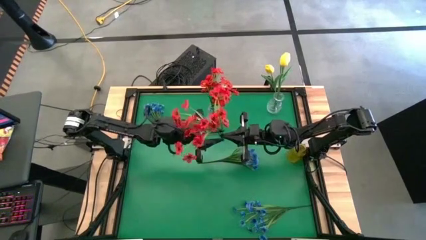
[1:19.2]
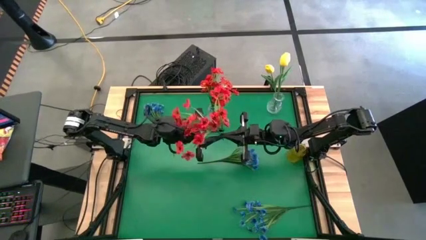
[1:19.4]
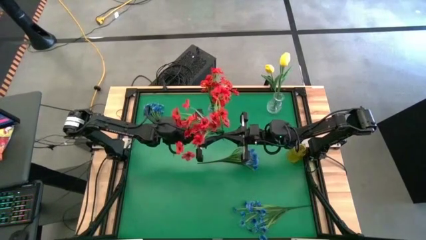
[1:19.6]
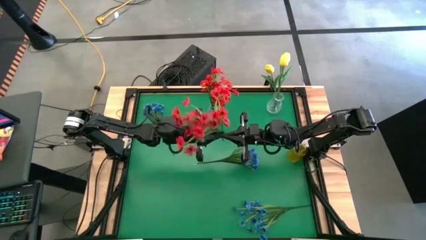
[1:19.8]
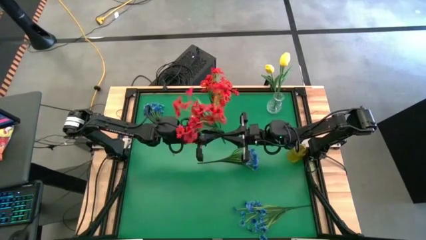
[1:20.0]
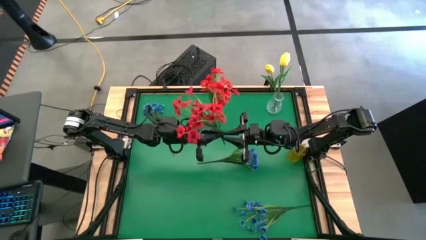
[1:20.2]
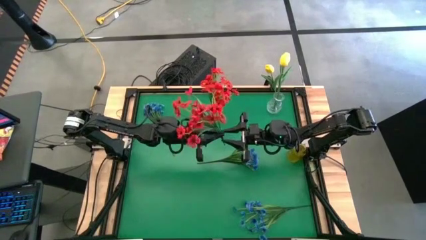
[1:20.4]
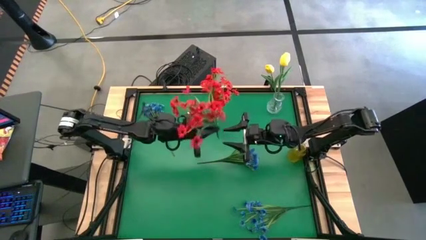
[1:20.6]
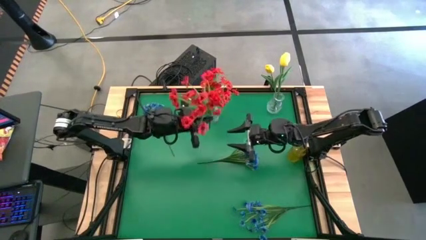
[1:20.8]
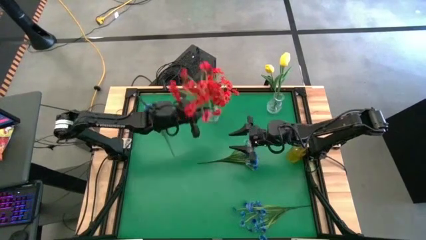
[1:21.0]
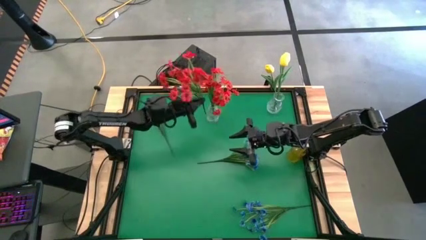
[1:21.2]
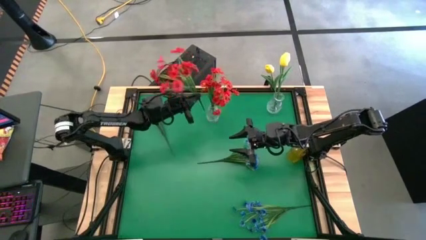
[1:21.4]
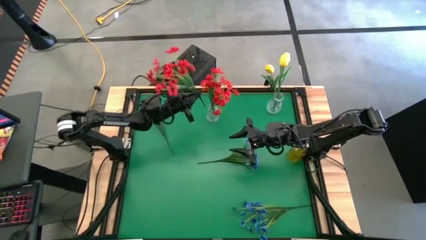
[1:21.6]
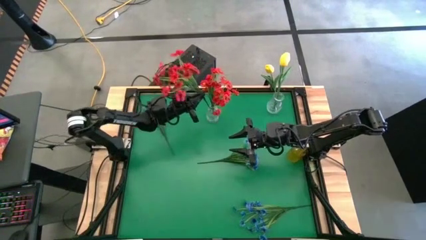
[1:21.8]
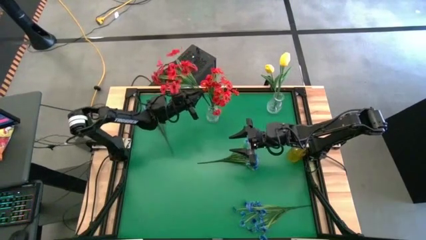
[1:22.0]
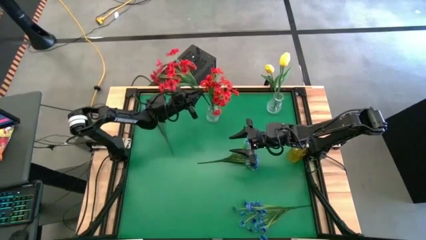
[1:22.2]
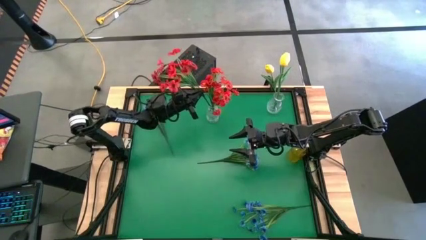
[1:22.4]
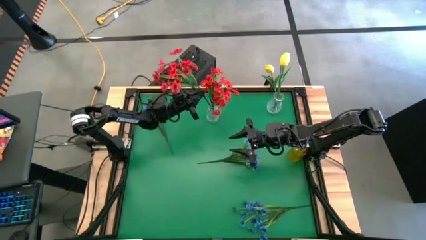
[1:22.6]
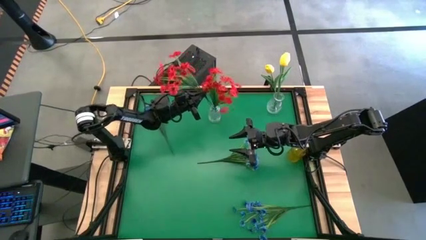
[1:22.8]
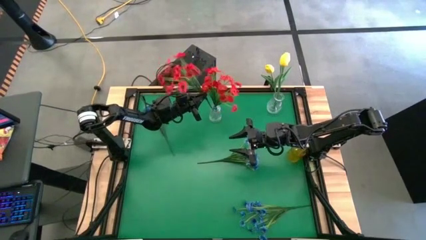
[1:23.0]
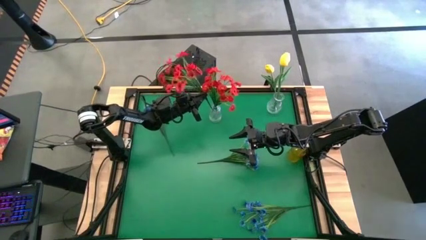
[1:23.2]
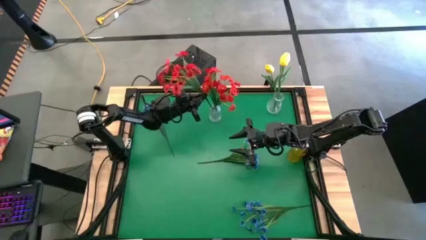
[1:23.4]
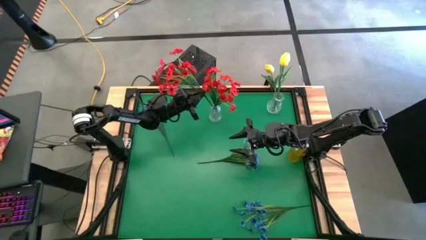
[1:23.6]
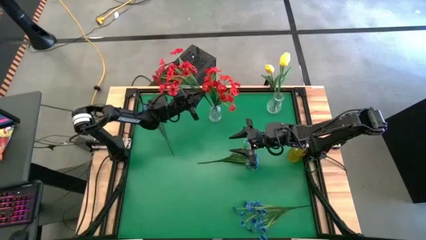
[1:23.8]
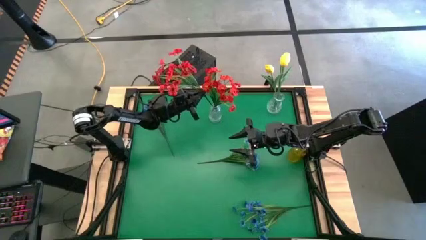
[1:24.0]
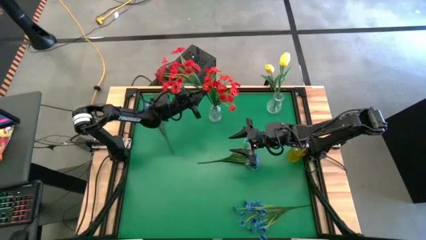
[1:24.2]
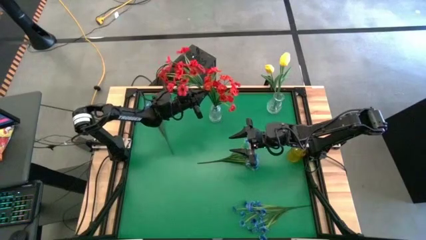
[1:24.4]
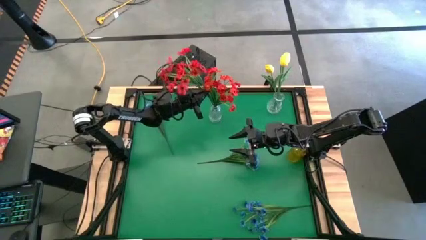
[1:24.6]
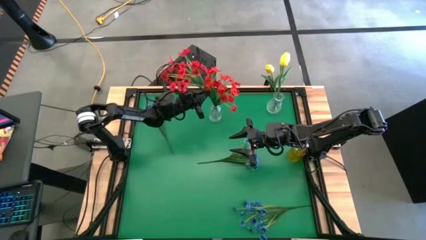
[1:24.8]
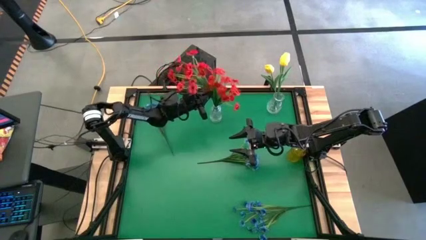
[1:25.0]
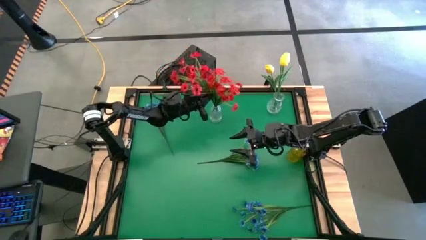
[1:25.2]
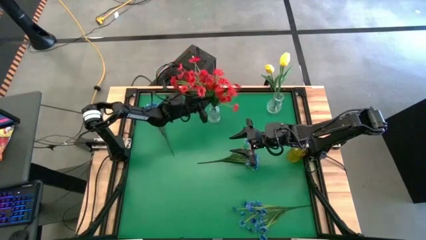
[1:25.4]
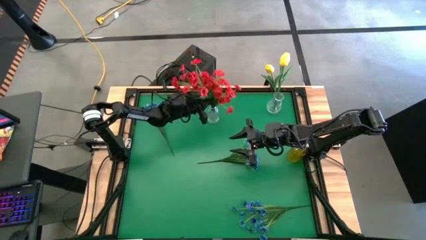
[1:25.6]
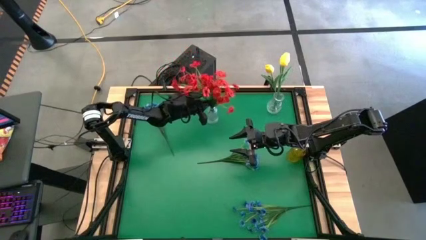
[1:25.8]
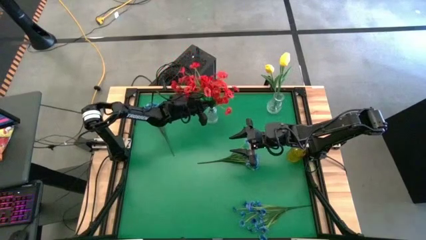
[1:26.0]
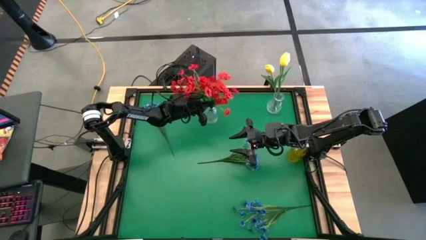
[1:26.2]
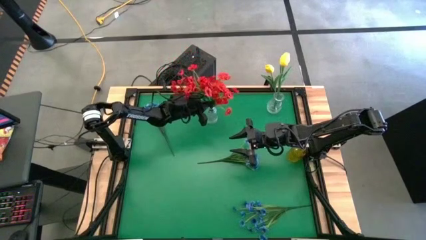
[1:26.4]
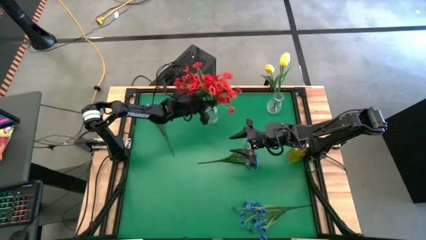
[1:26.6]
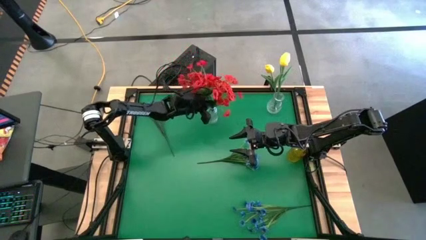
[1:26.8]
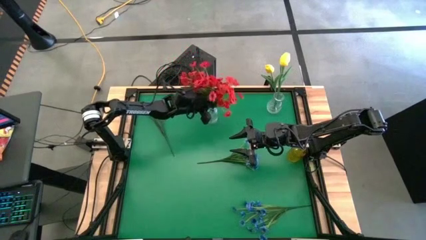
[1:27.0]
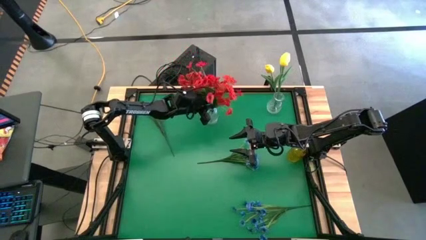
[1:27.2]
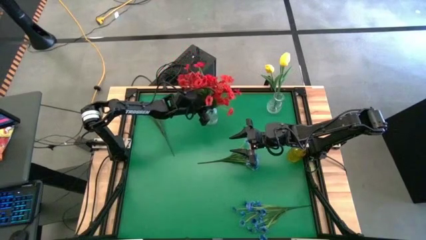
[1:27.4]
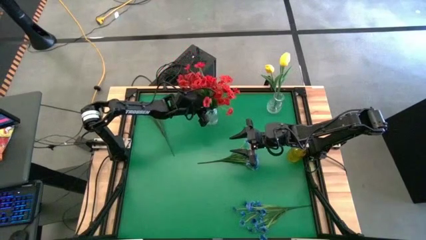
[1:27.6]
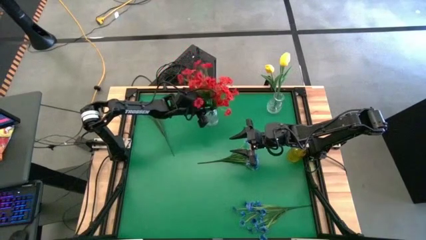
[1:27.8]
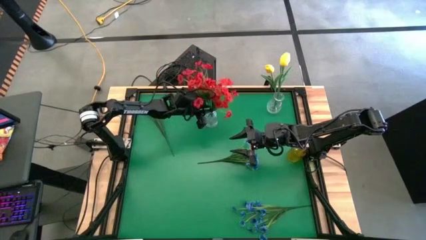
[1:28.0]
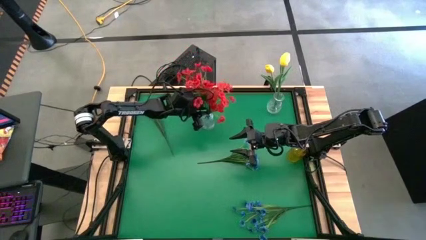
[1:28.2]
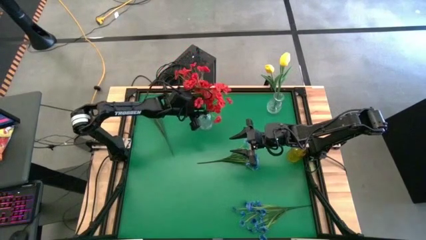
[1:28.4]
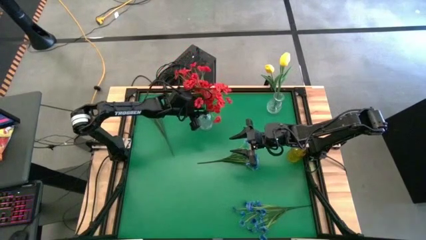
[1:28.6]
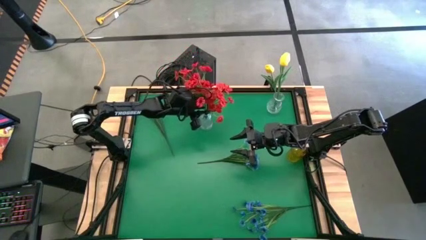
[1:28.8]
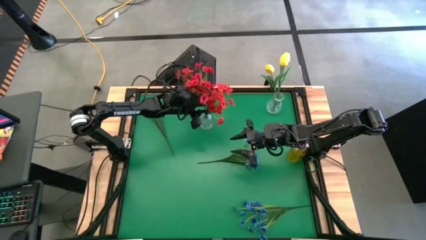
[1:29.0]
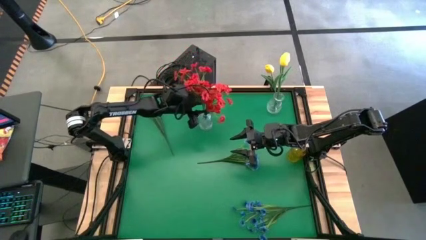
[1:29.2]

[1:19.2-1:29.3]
Task: Sort flowers into vase by color
Put the red flowers into the left white transparent vase

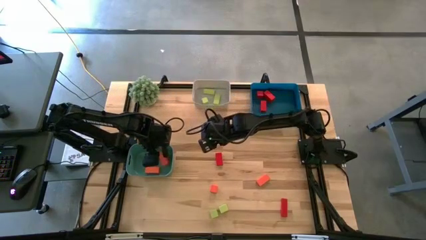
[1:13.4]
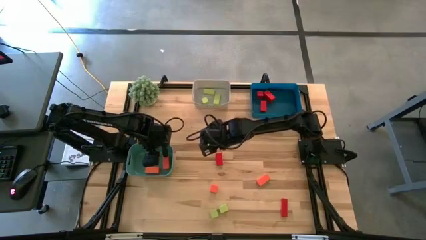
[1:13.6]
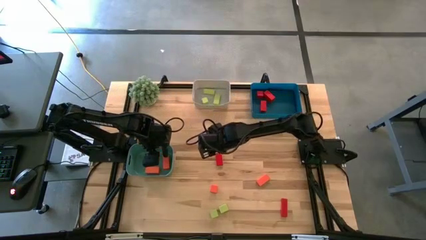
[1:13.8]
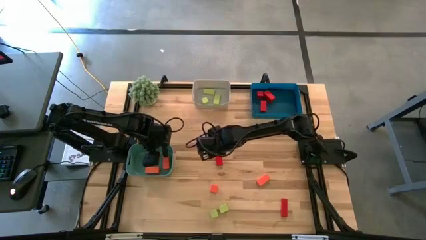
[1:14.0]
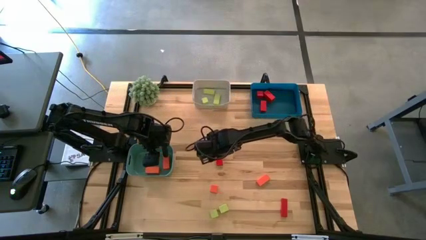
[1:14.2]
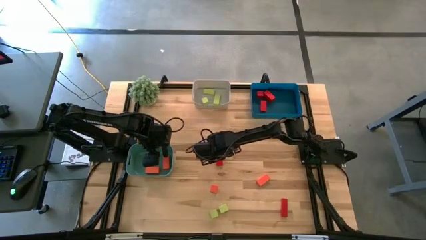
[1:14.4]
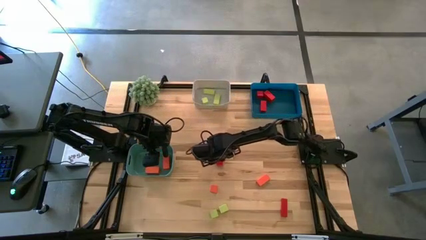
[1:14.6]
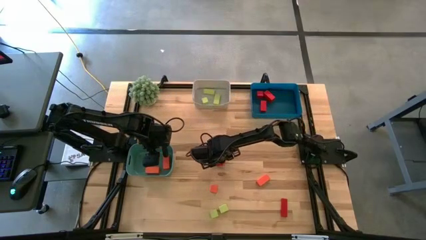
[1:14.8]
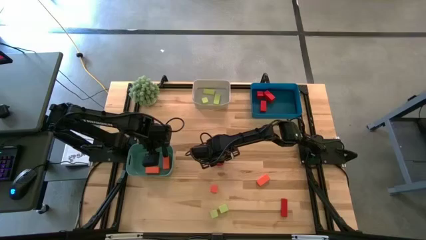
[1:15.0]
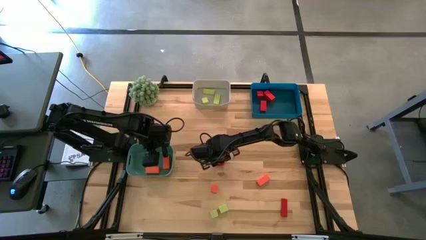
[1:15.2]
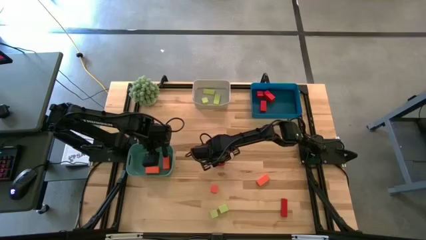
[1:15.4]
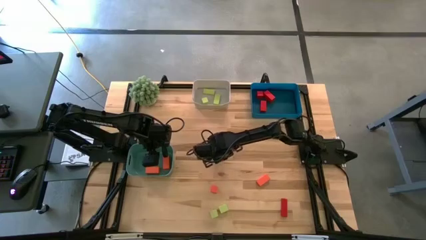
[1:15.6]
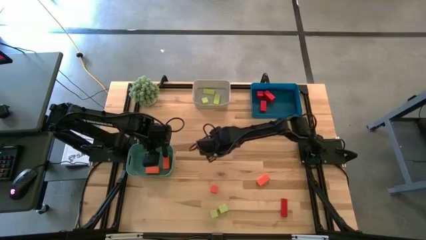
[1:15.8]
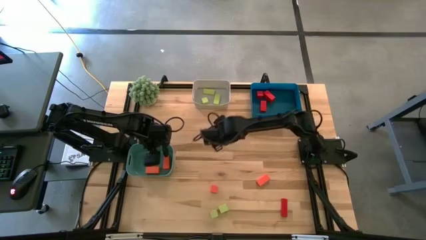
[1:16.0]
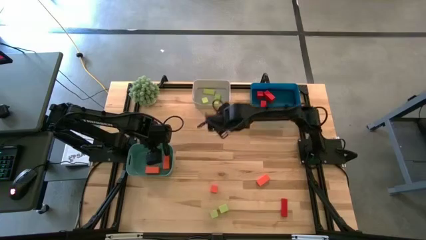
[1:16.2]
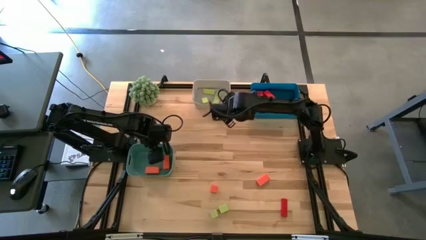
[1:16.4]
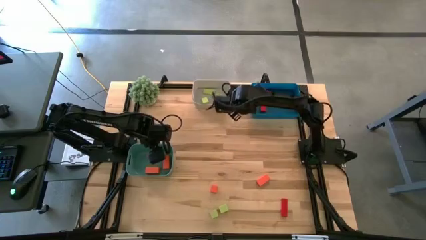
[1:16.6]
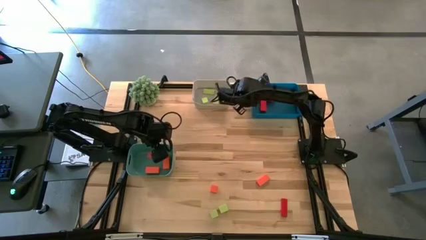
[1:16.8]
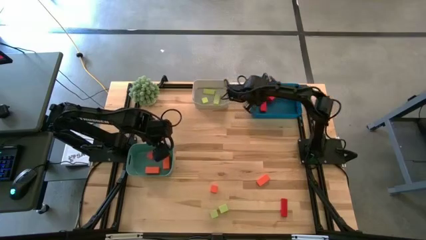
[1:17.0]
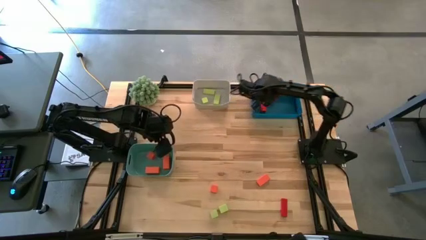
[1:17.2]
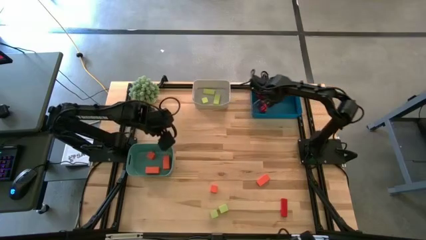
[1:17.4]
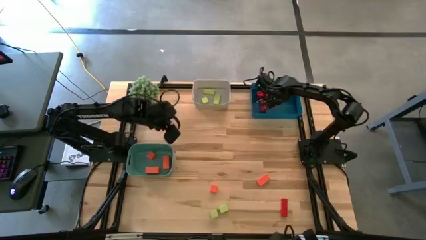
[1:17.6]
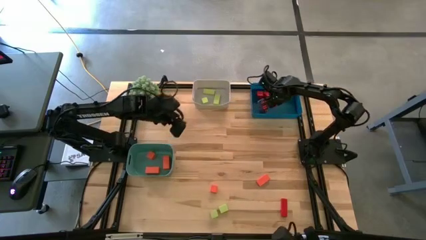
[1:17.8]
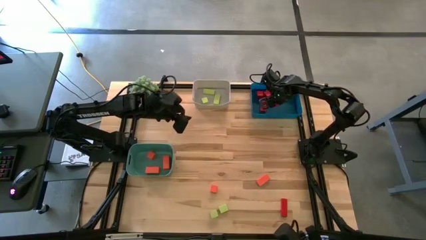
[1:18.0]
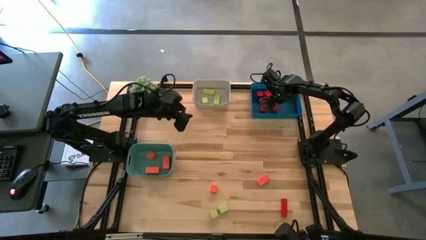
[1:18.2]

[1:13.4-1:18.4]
Task: Sort & place blocks by color
Put the red block into the blue bin
